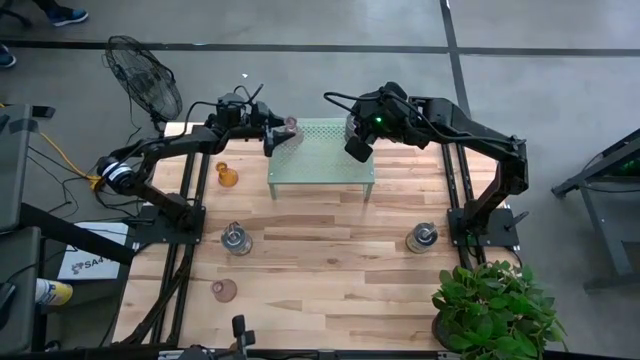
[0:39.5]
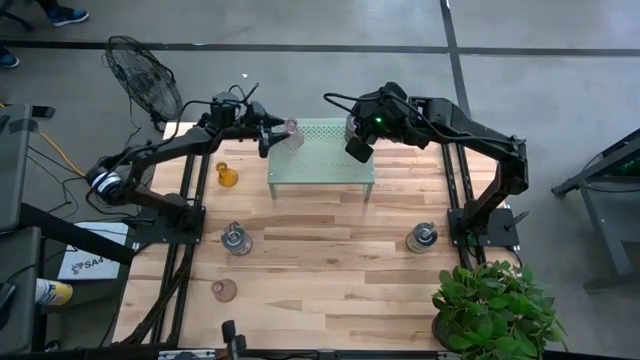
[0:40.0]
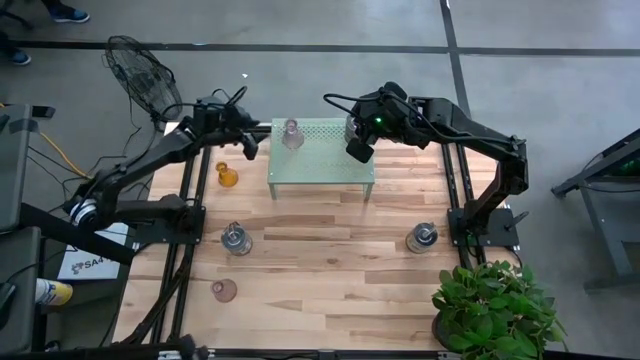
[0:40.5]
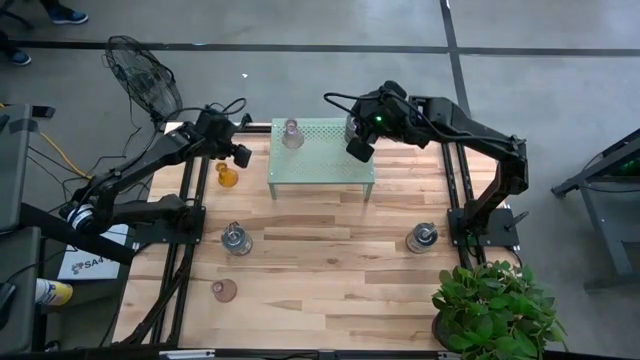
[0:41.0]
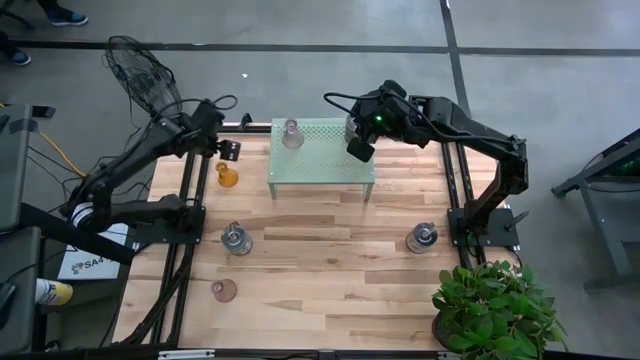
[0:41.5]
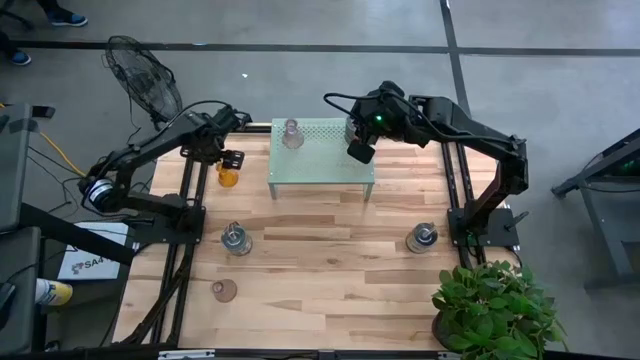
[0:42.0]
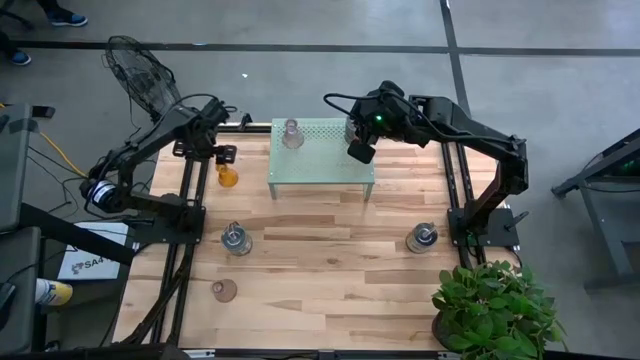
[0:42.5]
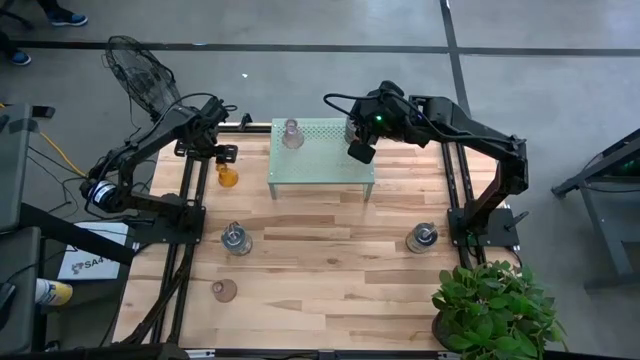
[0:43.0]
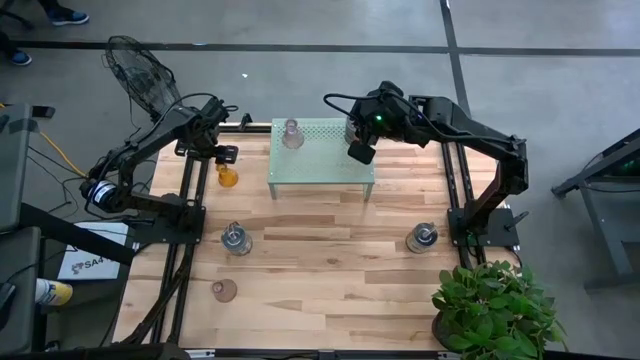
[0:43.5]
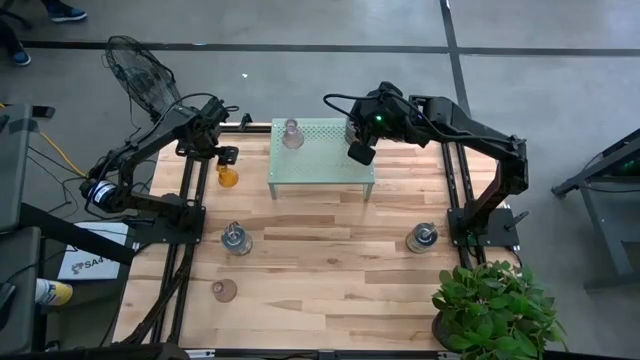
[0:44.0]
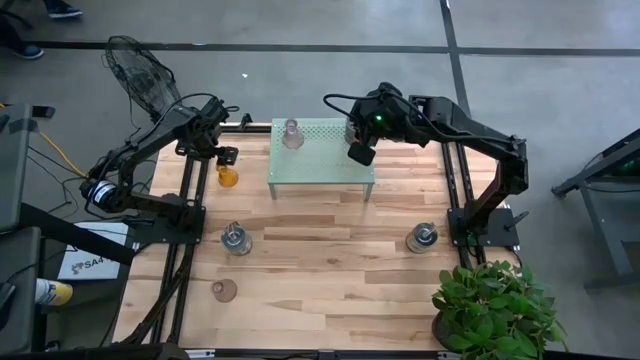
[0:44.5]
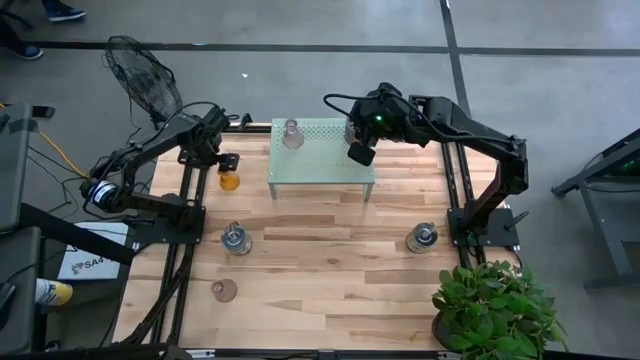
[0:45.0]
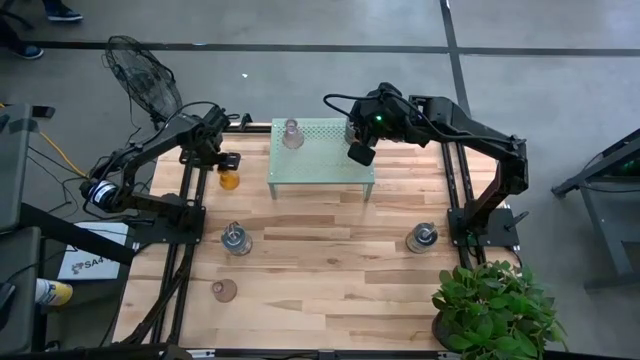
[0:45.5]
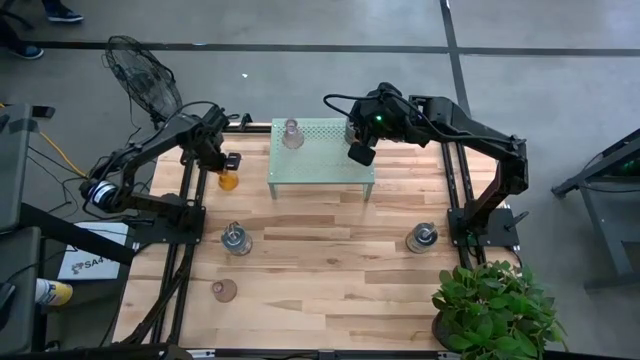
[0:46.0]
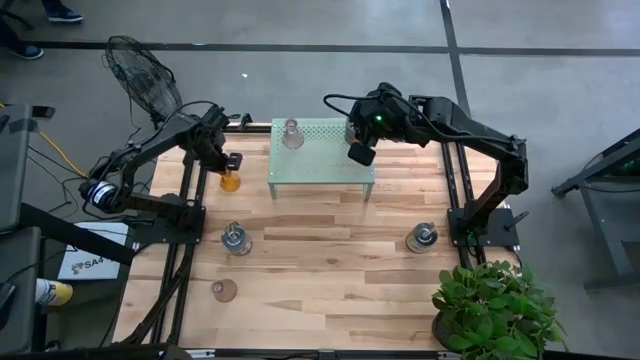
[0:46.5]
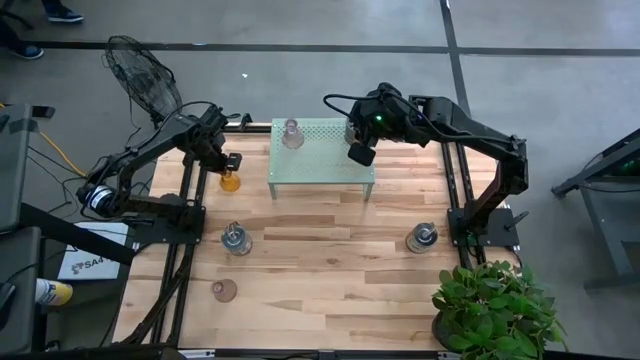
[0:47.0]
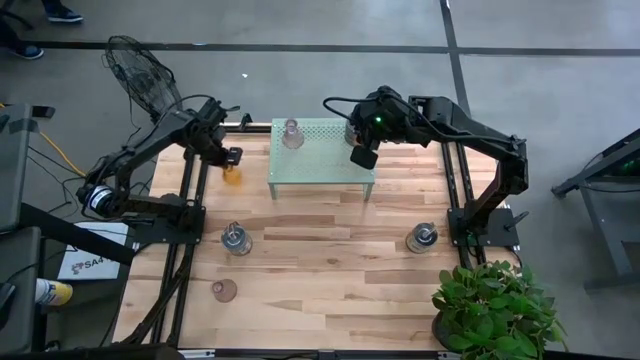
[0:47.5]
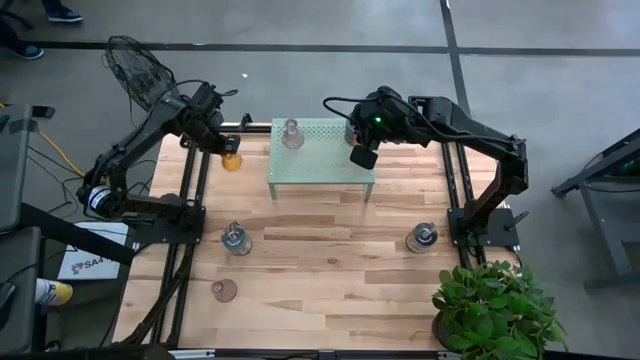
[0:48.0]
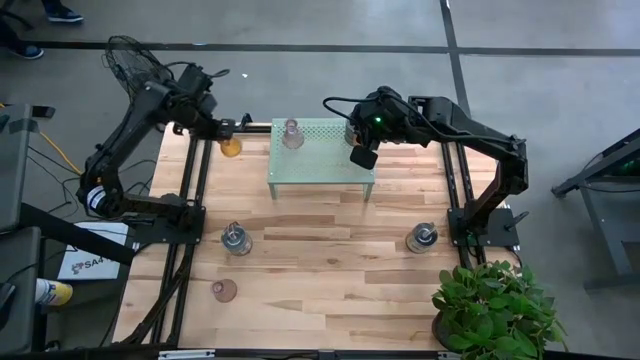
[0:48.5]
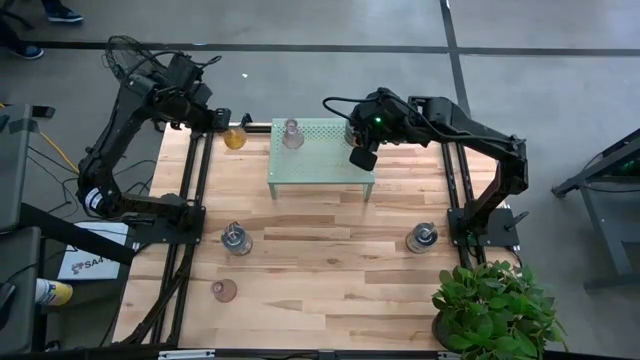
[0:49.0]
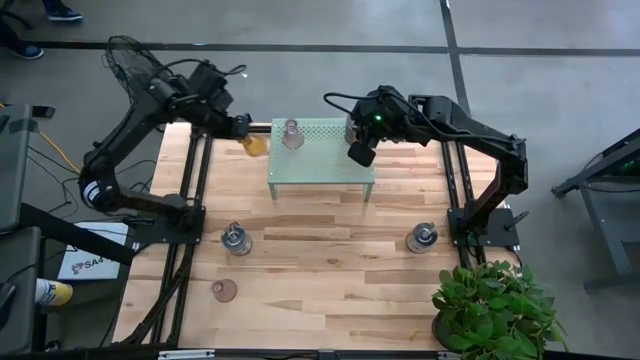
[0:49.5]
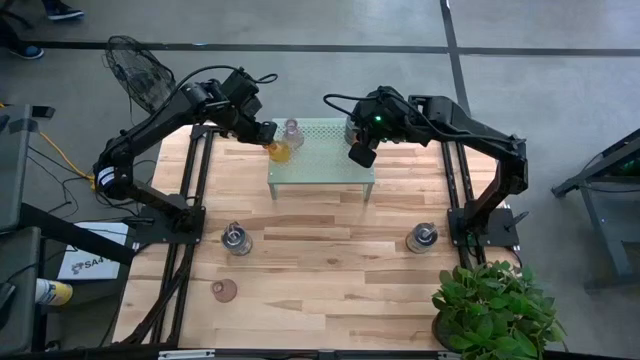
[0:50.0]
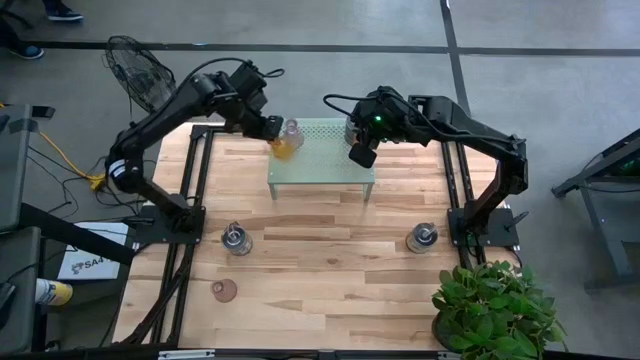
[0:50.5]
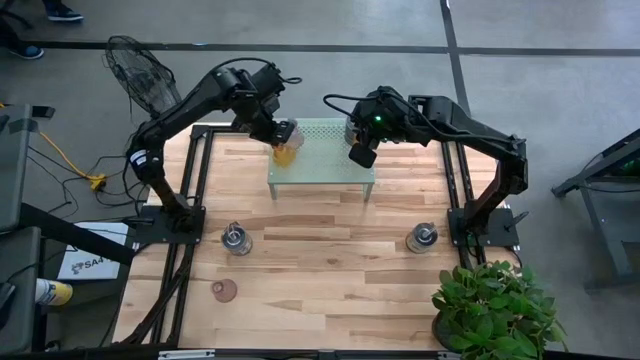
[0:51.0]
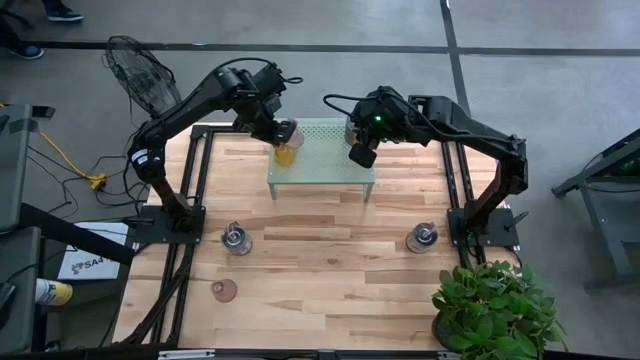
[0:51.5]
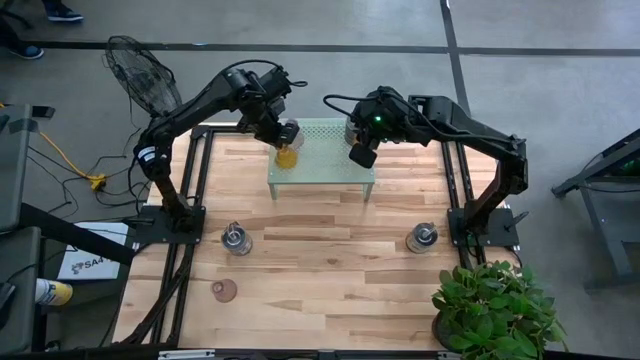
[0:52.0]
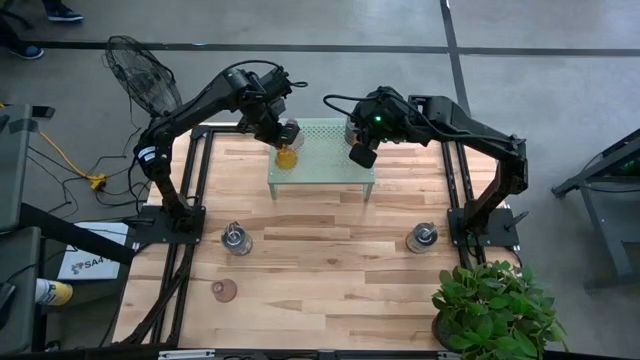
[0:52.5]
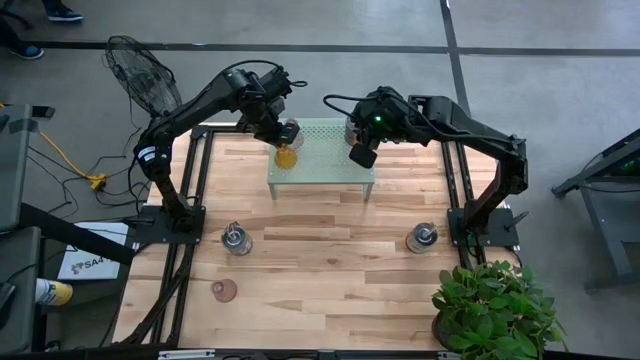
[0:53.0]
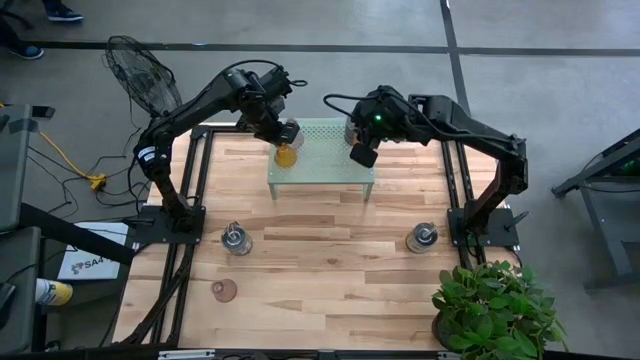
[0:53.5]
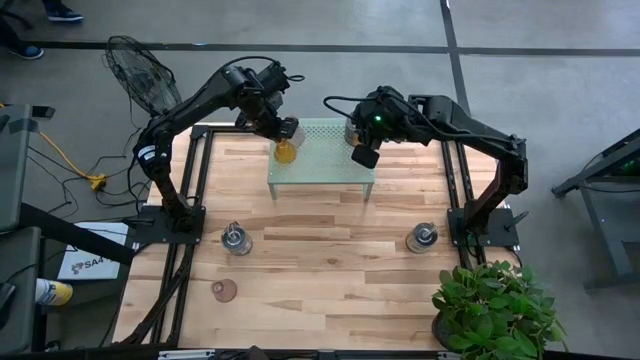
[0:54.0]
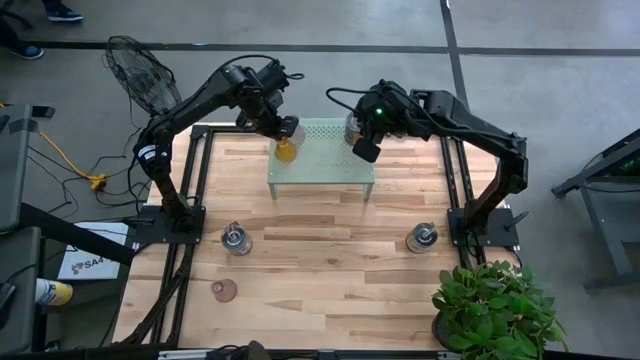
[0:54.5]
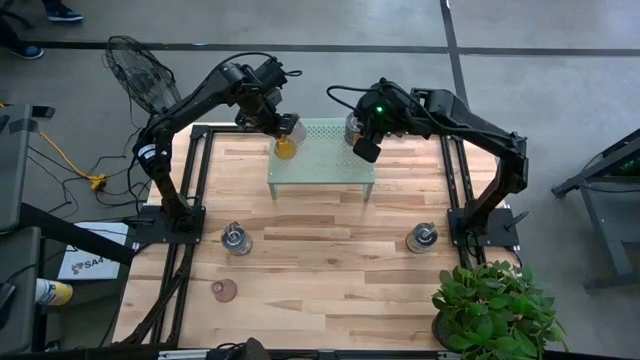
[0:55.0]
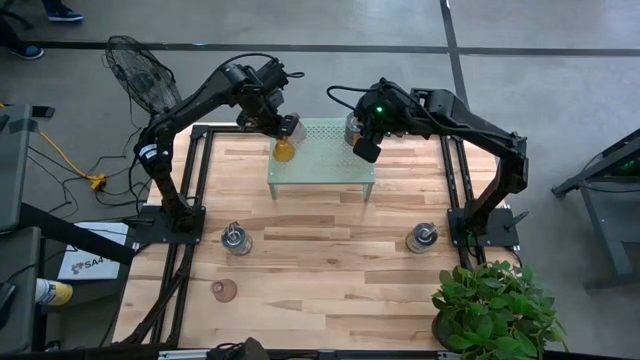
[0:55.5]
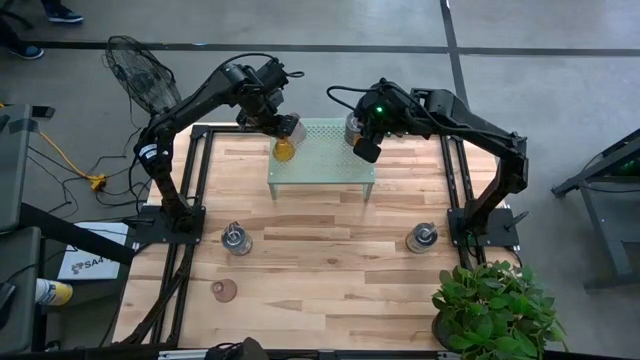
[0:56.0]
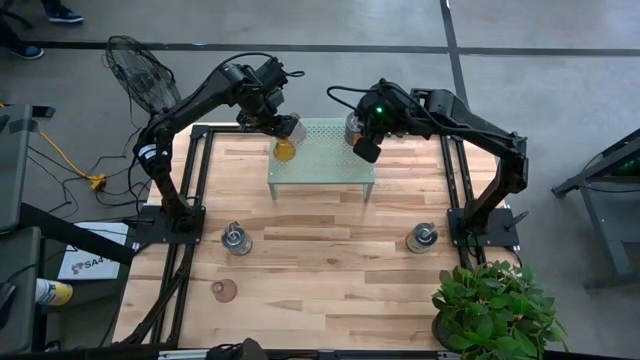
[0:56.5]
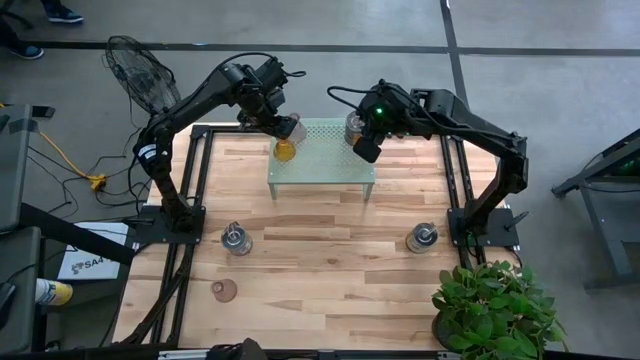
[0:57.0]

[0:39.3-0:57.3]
Task: Pick & Place candle stick holders
Put the yellow glass candle holder on the shelf

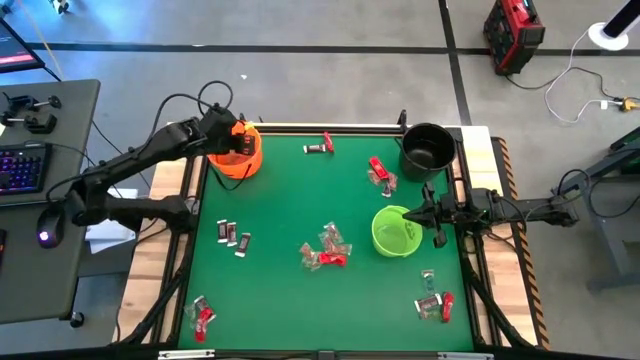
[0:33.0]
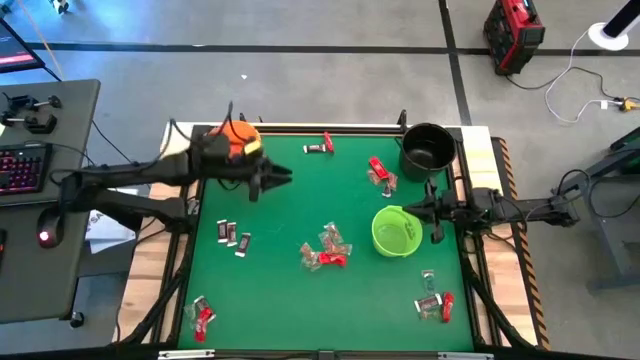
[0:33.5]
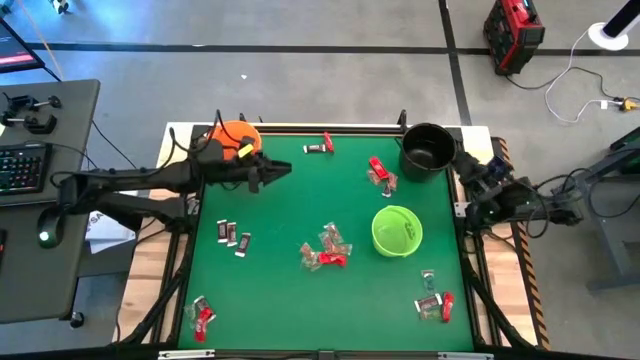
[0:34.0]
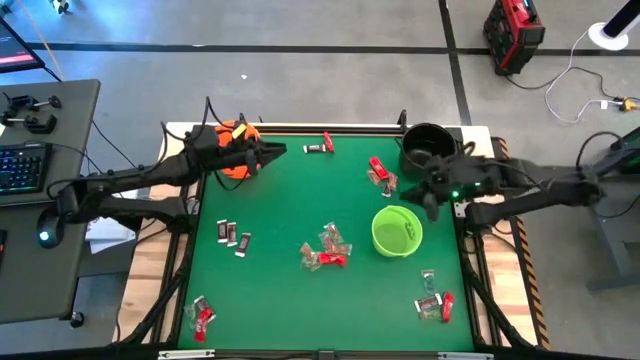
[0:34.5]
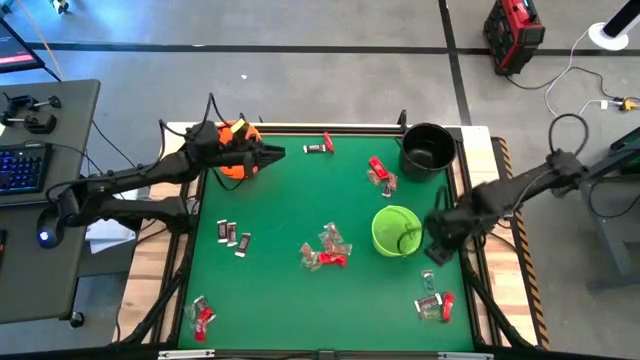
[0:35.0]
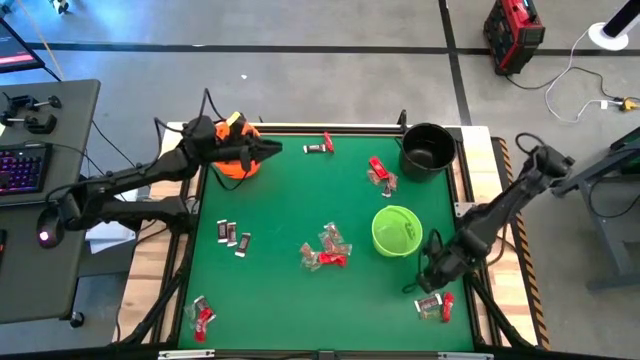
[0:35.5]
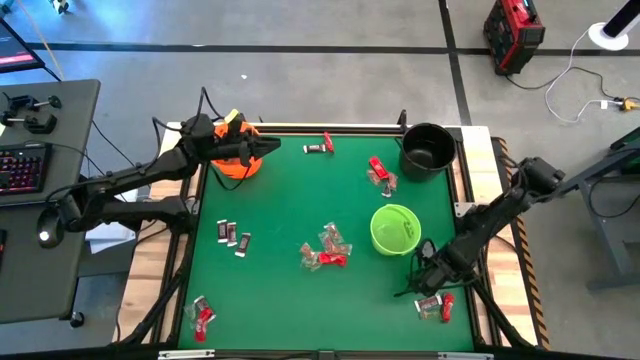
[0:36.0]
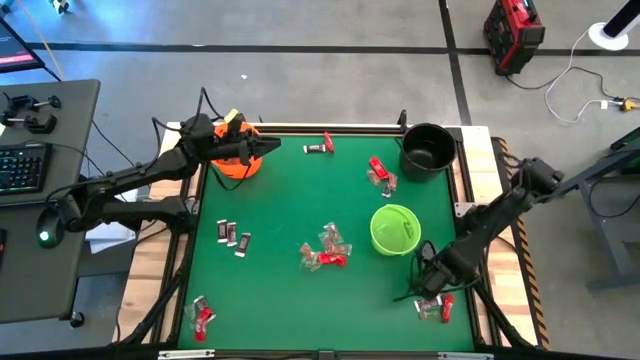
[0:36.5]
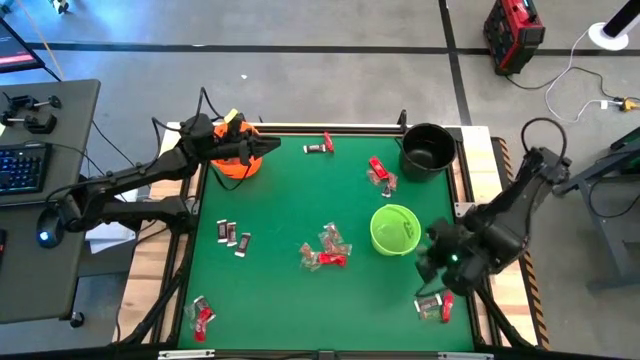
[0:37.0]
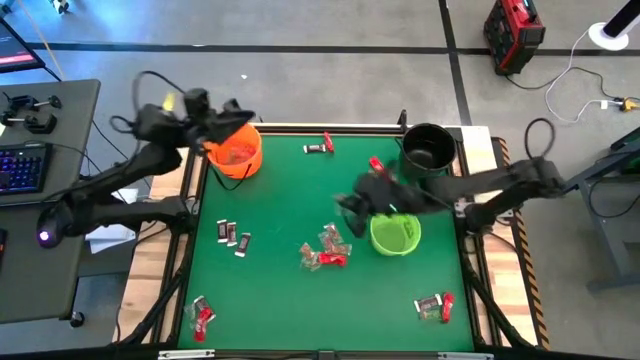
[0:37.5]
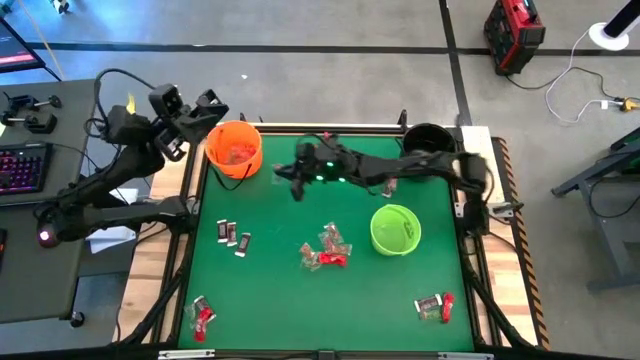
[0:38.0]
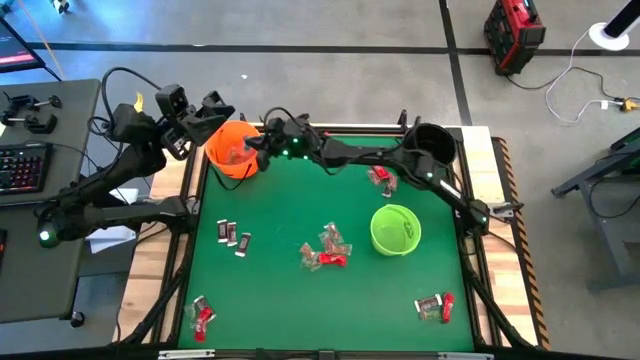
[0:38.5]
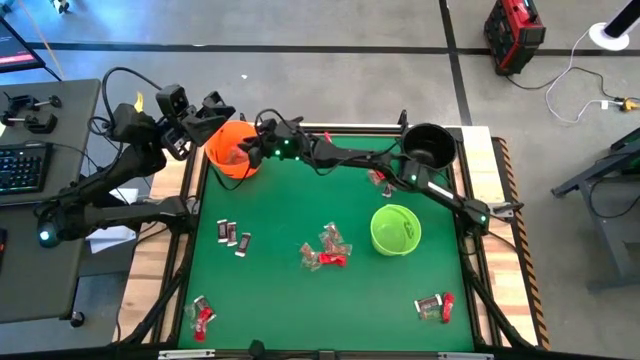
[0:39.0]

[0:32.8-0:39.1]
Task: Sort candy by brand, put in halloween buckets
Put the blue gummy into the orange bucket
